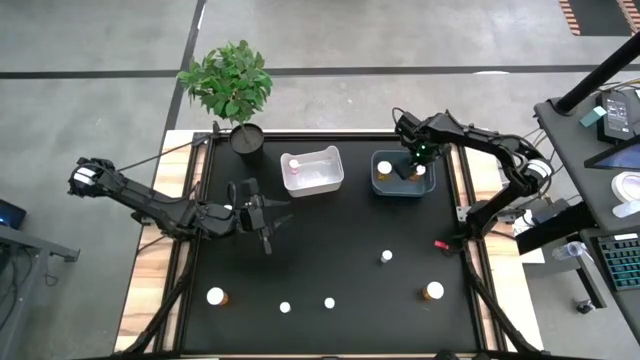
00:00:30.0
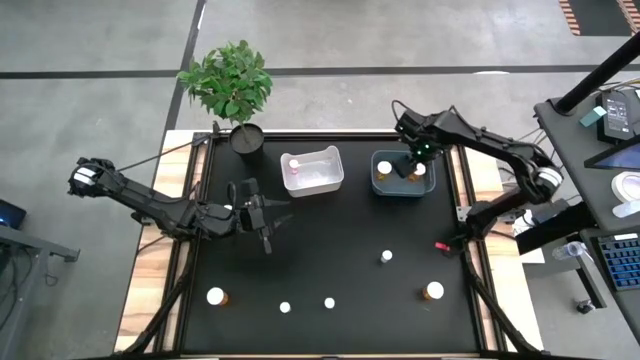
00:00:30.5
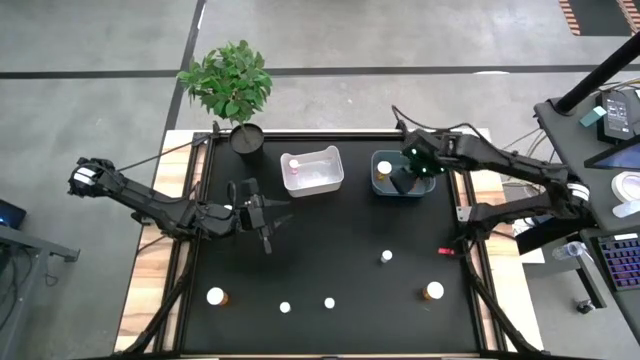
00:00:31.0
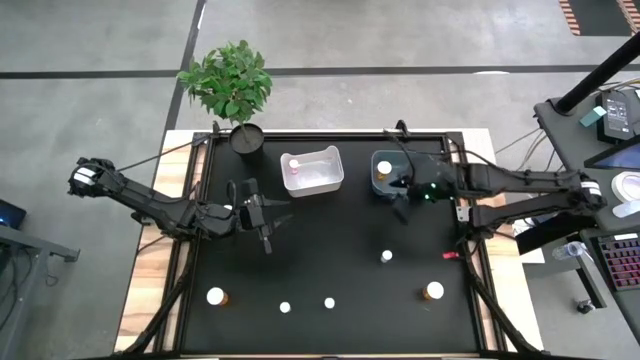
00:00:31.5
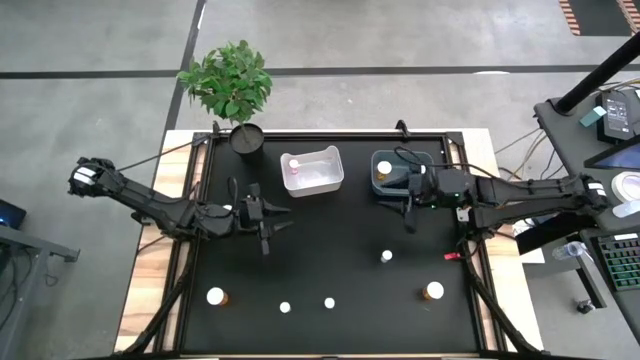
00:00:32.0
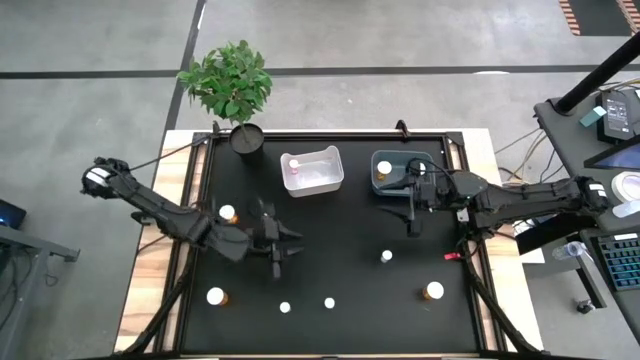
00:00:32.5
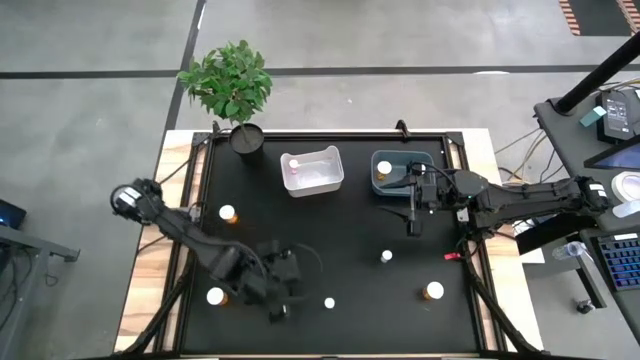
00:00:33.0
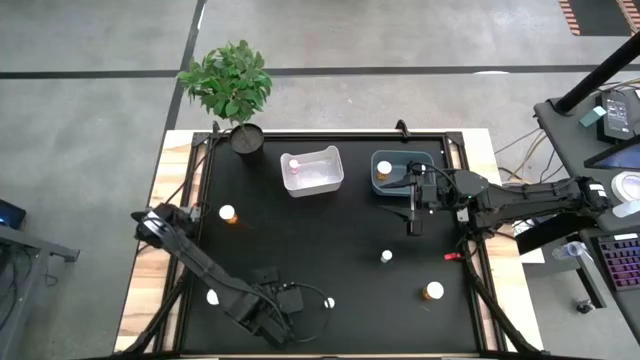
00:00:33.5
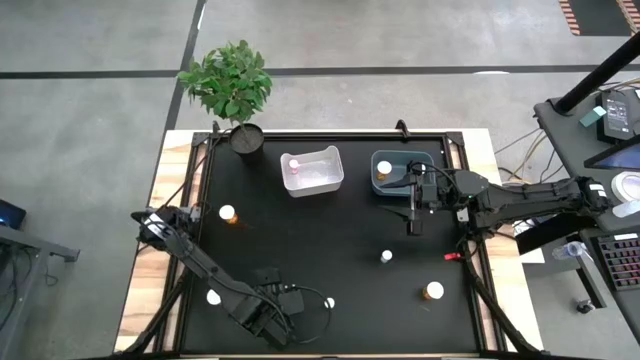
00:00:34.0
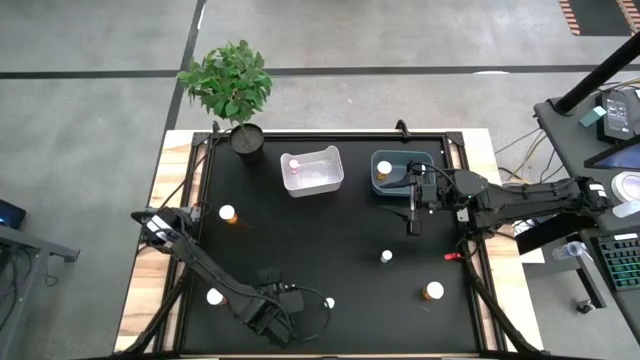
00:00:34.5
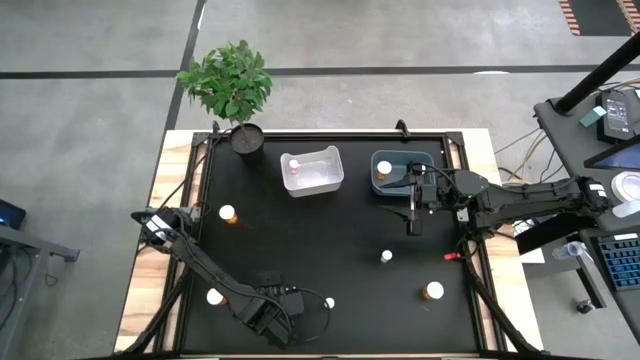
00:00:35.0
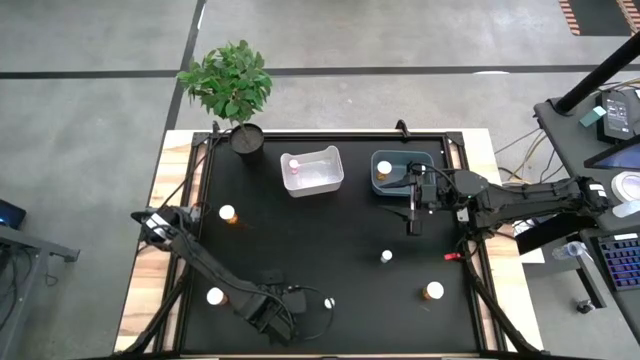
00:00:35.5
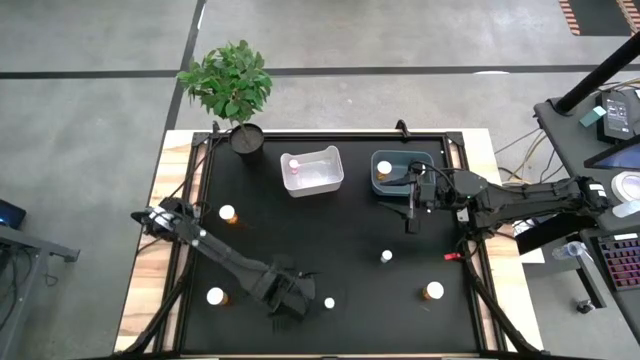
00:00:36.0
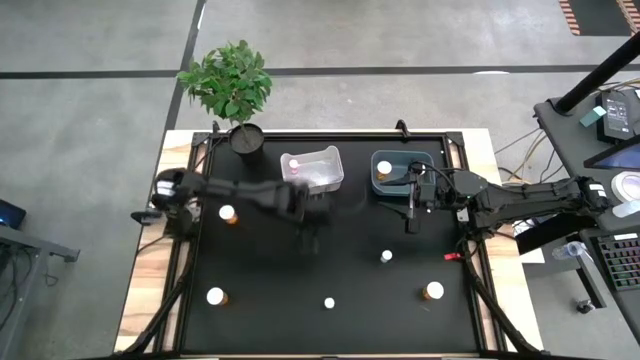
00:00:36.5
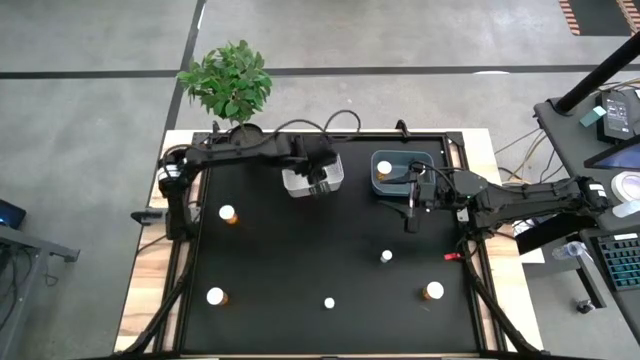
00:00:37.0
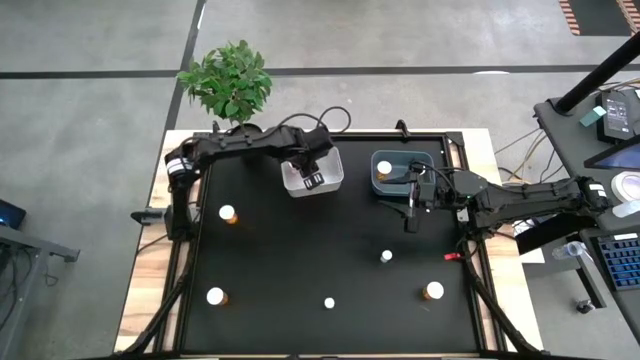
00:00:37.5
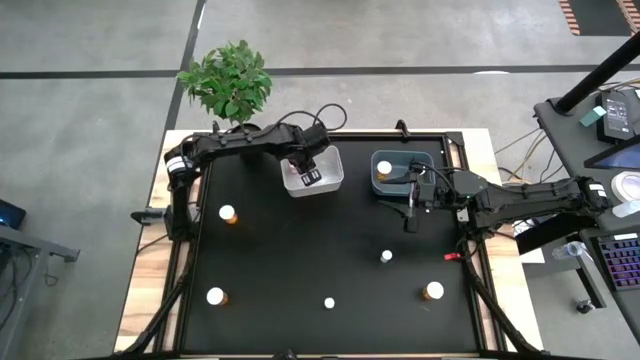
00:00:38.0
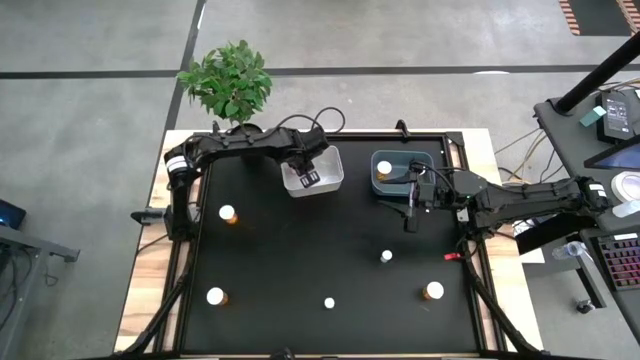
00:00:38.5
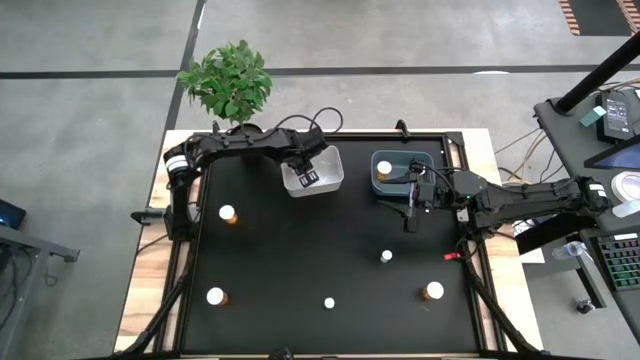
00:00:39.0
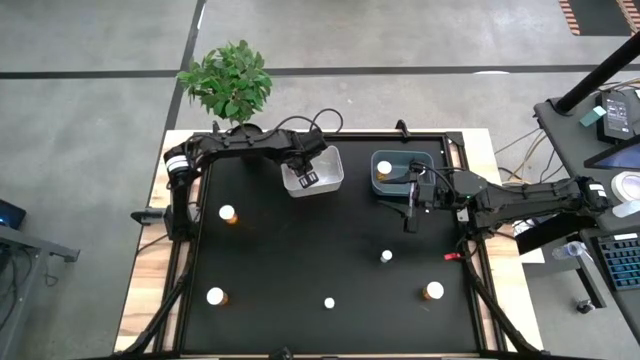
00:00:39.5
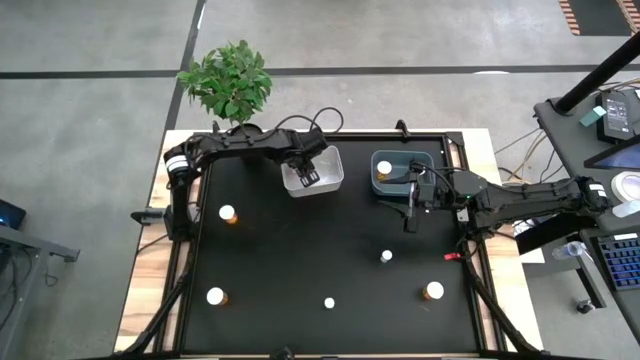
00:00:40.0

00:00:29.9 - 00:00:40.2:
Task: Pick and place medicine bottles into bin by pill shape (circle, oval)
Put the blue tablet bottle into the white bin

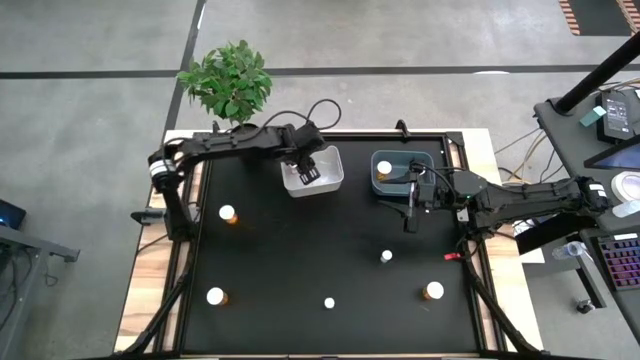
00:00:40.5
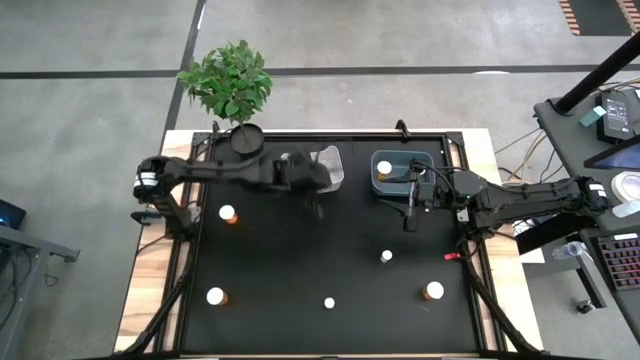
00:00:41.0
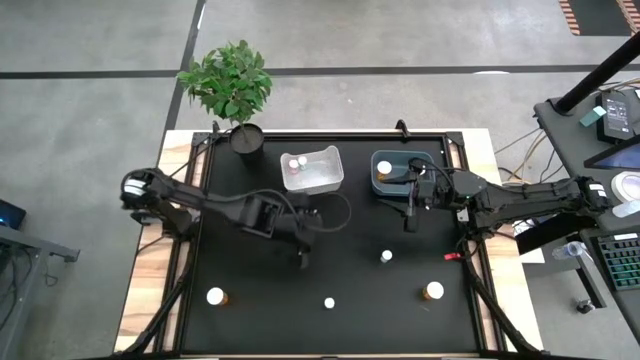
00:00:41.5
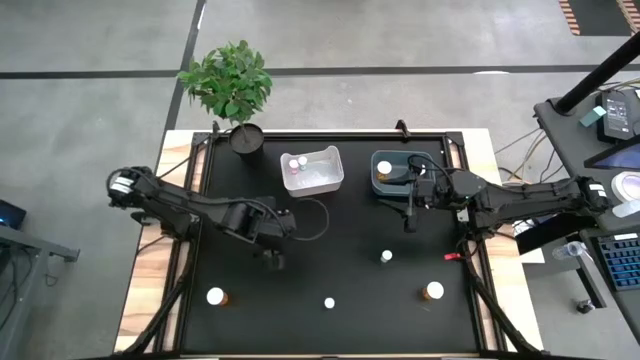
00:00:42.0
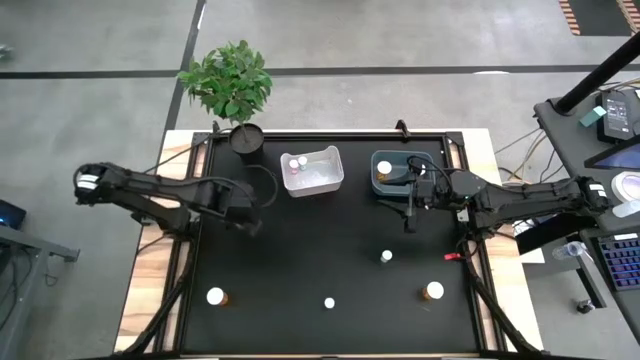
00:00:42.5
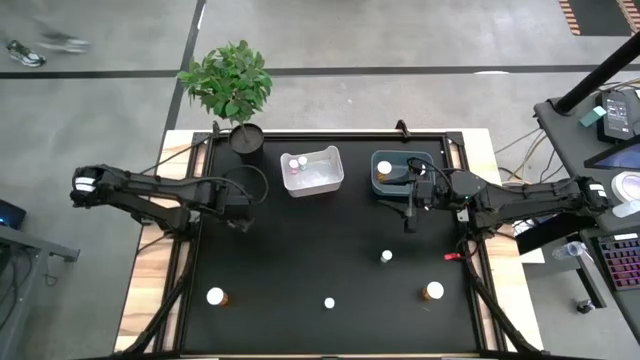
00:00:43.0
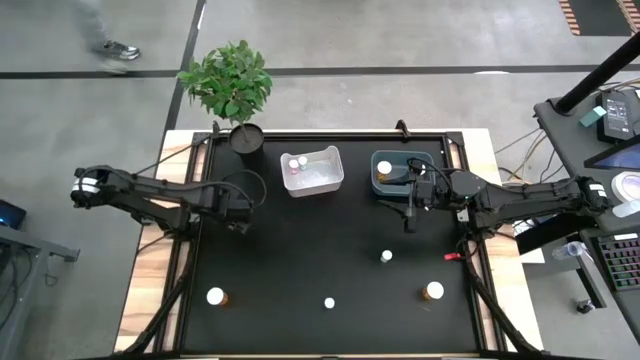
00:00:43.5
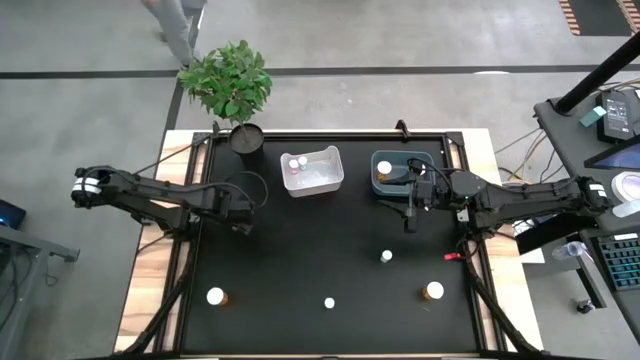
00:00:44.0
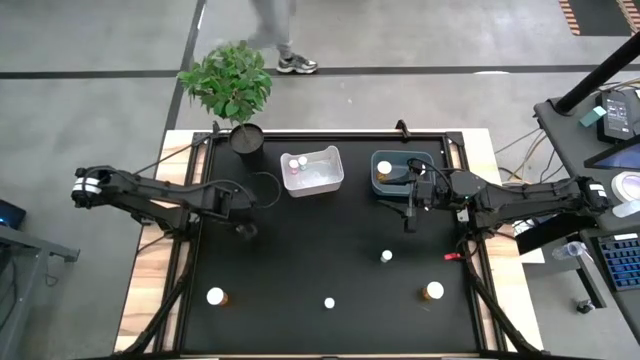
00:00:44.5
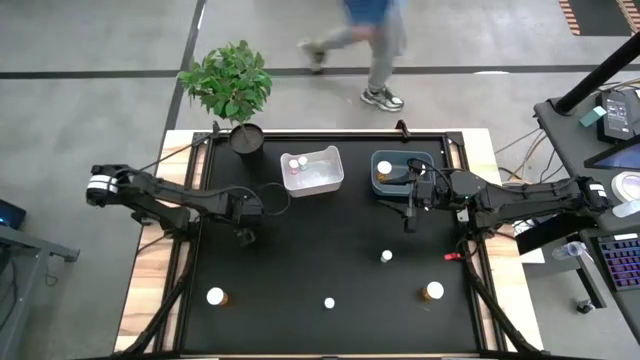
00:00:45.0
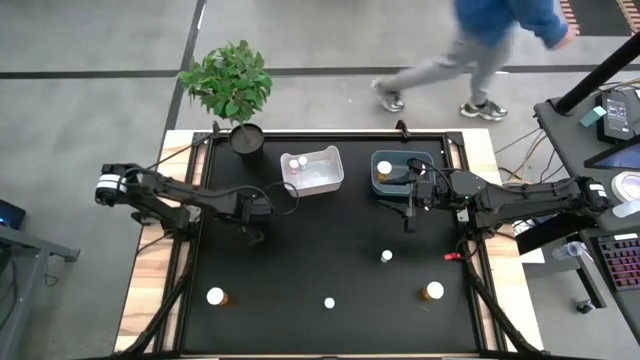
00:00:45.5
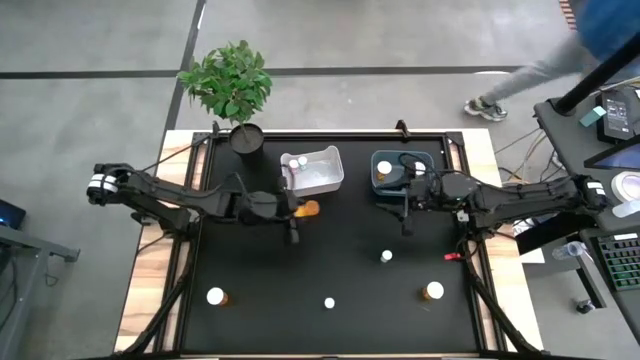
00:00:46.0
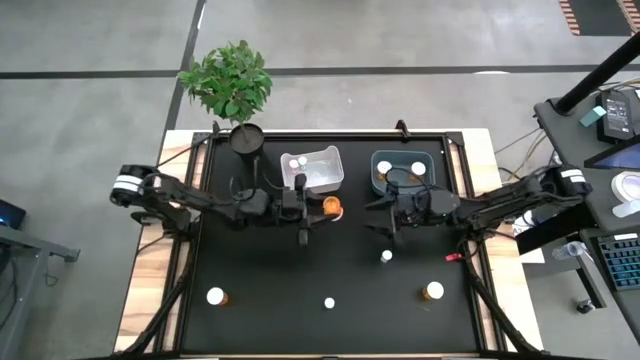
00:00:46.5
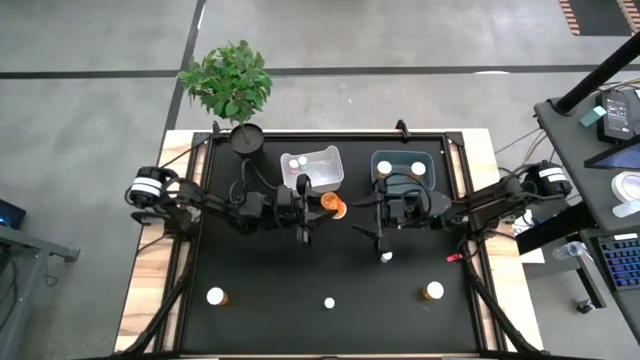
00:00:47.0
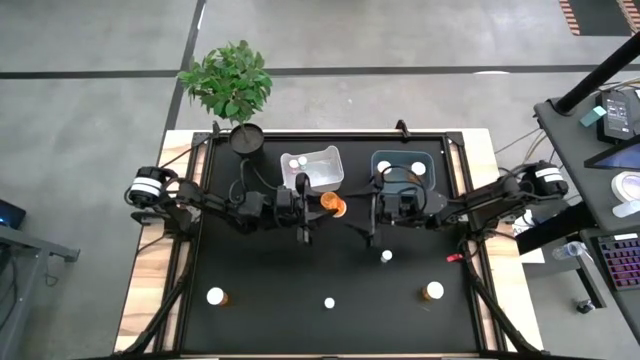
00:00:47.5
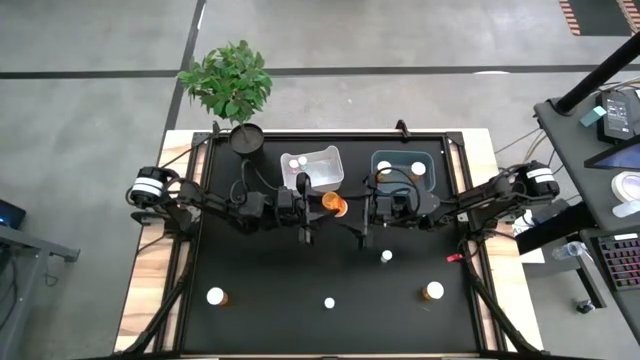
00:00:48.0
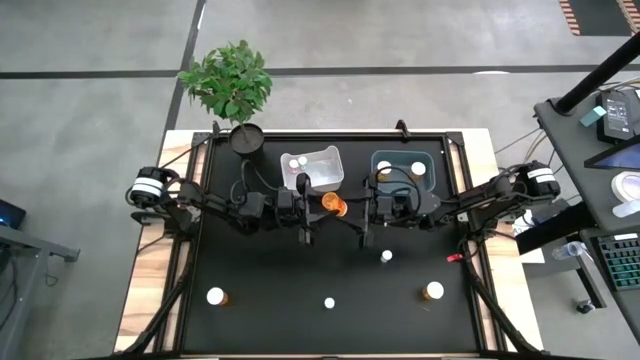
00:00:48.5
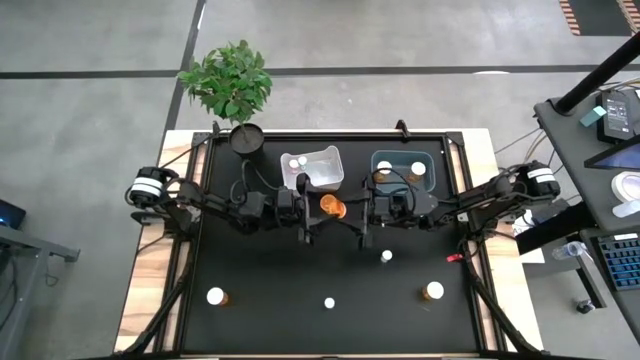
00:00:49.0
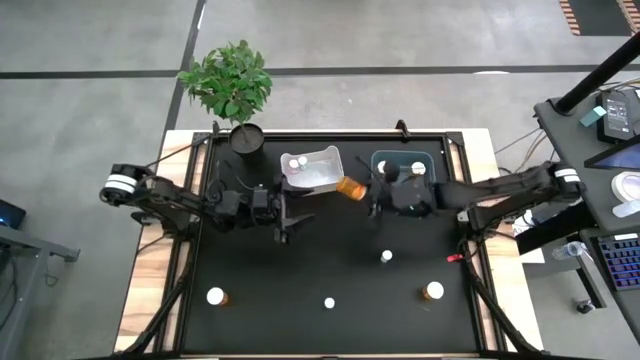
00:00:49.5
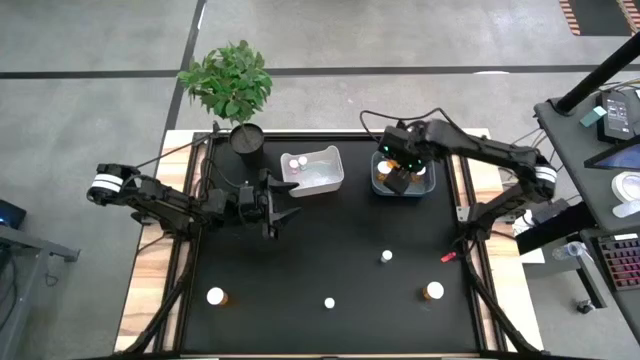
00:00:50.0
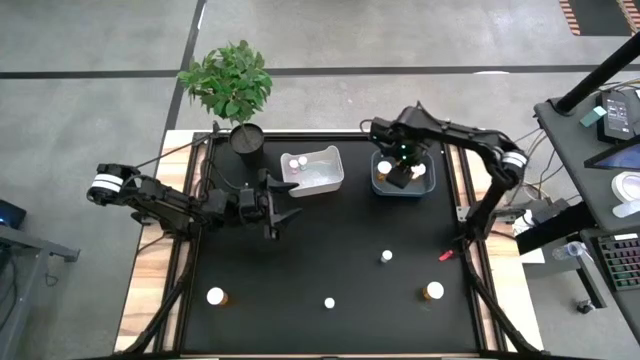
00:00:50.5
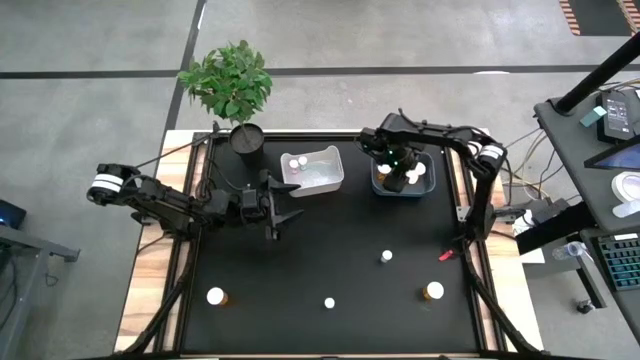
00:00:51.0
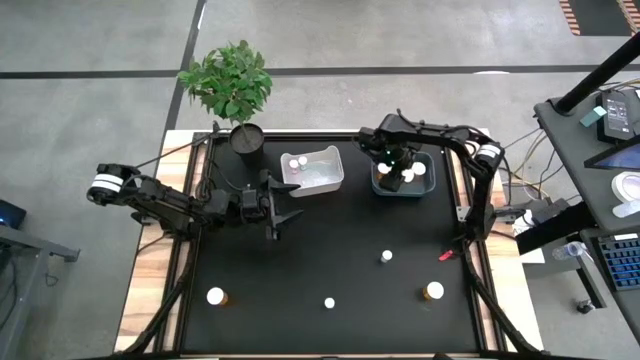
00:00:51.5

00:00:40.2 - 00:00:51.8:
Put the orange capsule bottle into the blue bin
